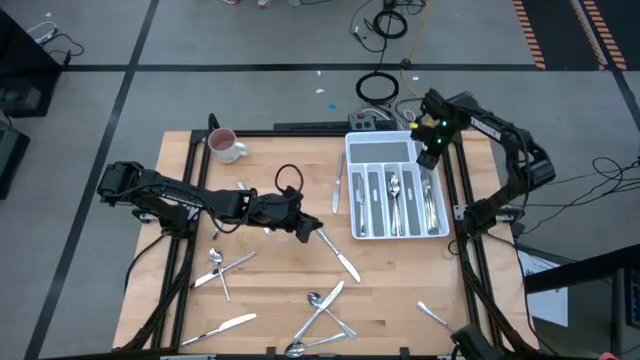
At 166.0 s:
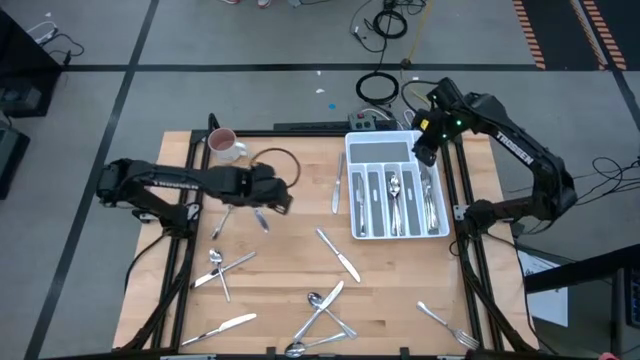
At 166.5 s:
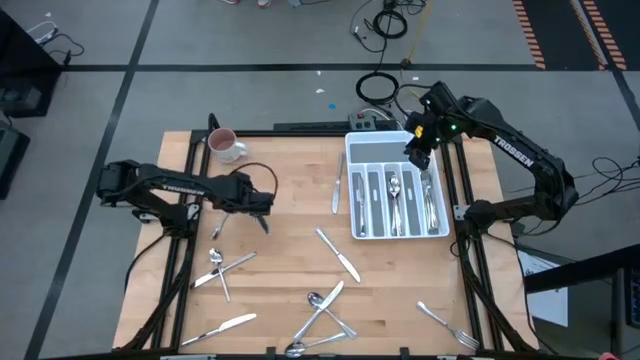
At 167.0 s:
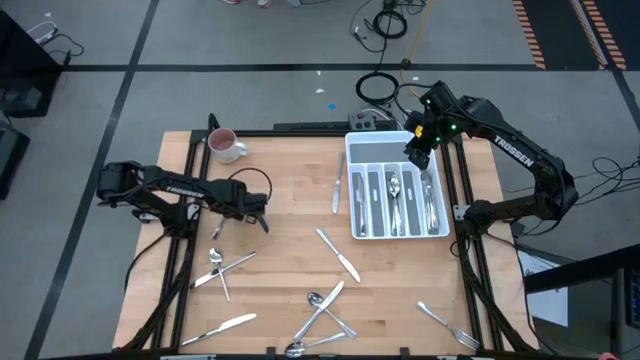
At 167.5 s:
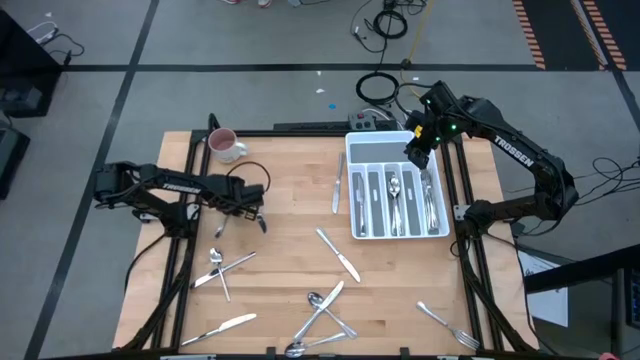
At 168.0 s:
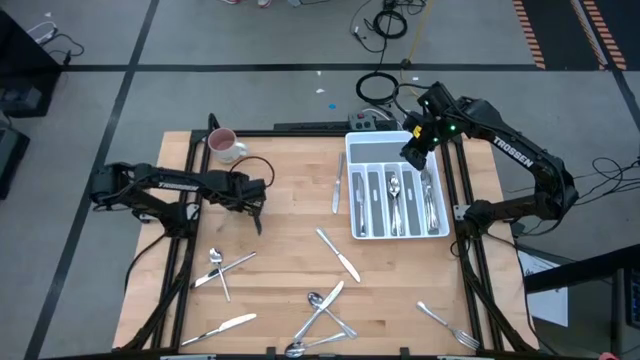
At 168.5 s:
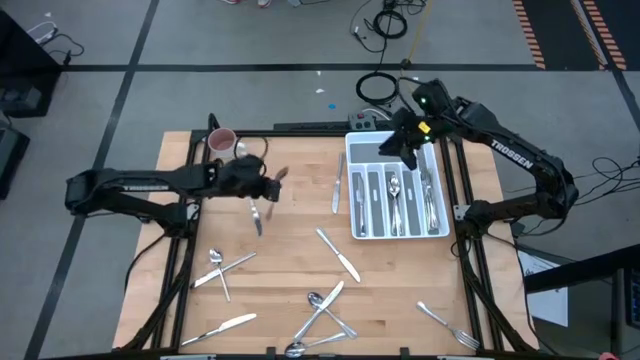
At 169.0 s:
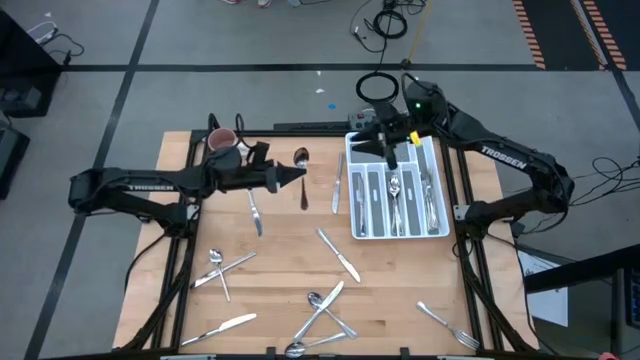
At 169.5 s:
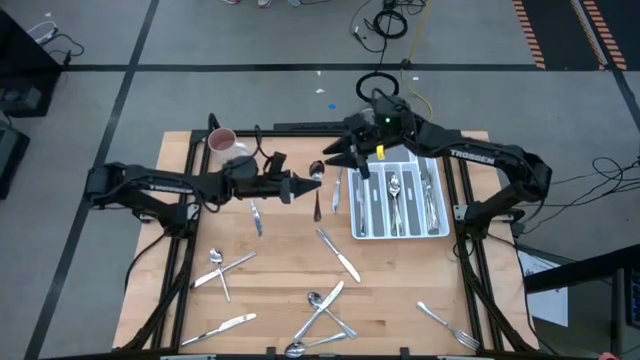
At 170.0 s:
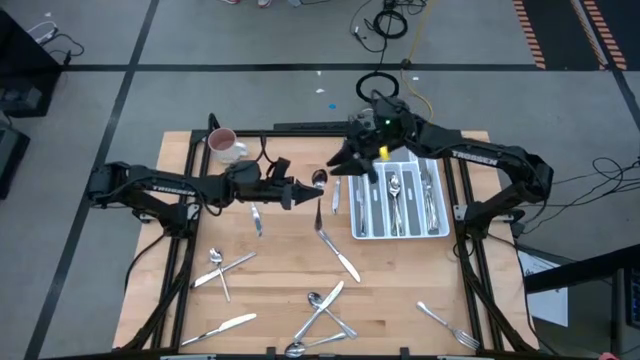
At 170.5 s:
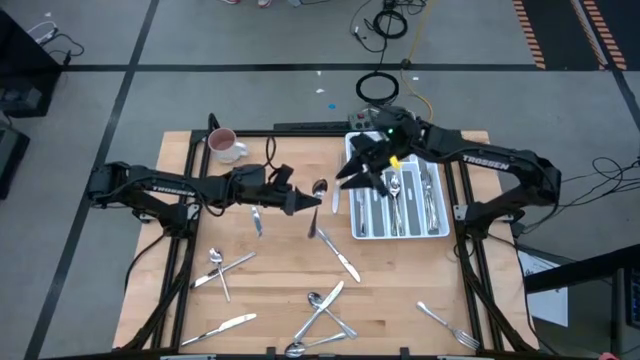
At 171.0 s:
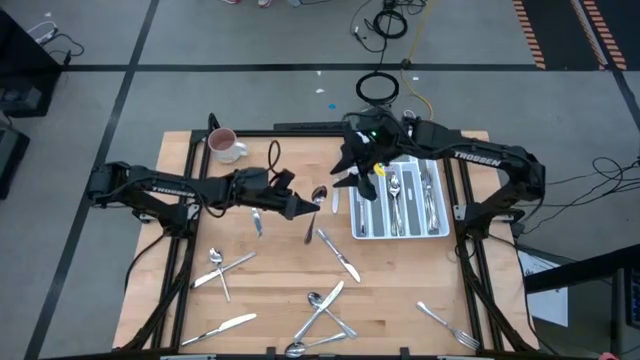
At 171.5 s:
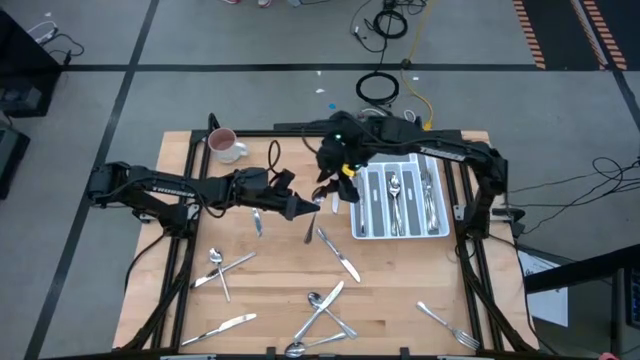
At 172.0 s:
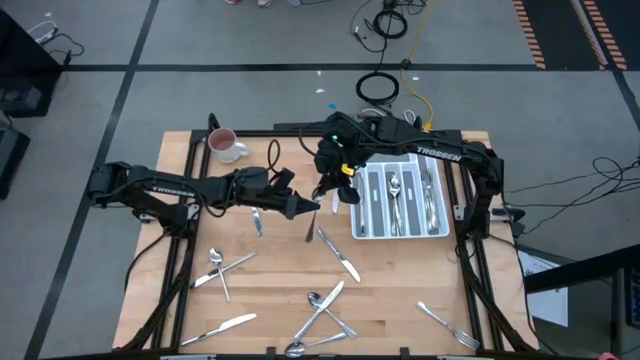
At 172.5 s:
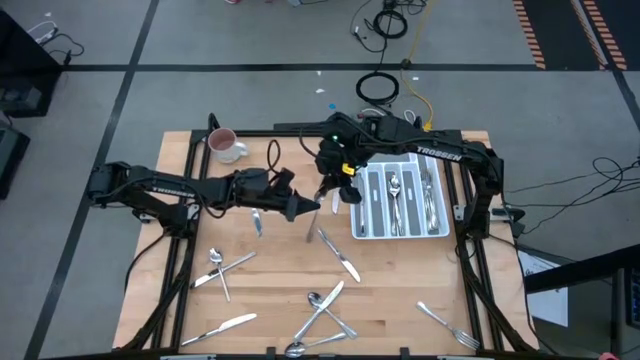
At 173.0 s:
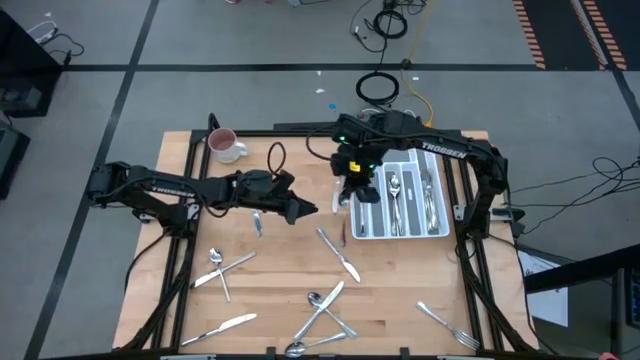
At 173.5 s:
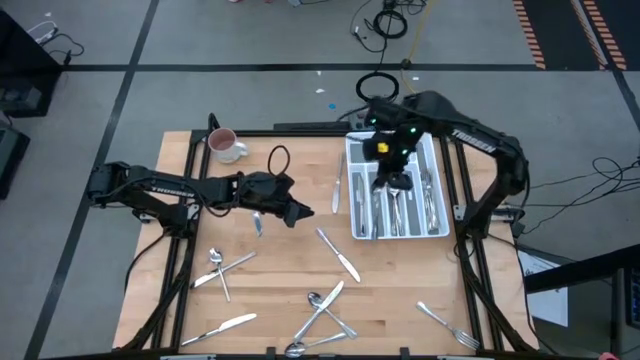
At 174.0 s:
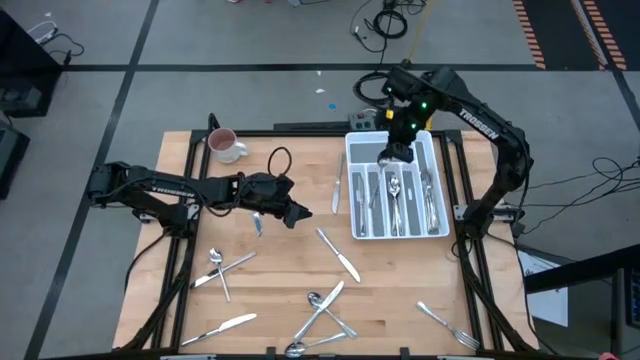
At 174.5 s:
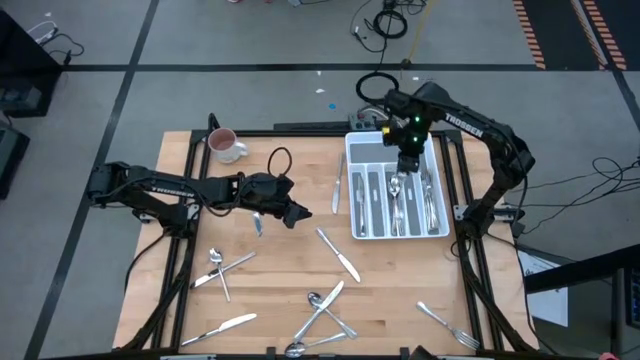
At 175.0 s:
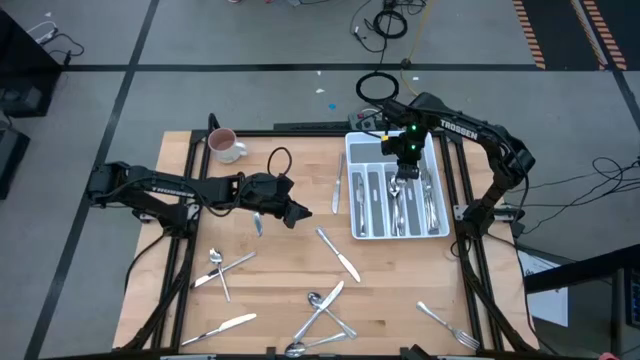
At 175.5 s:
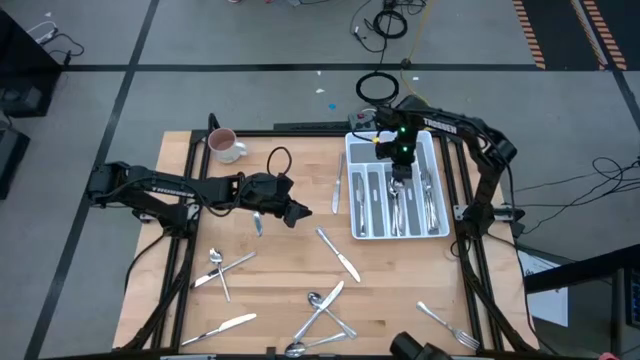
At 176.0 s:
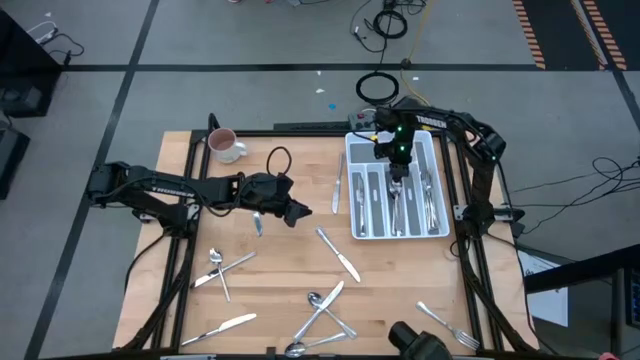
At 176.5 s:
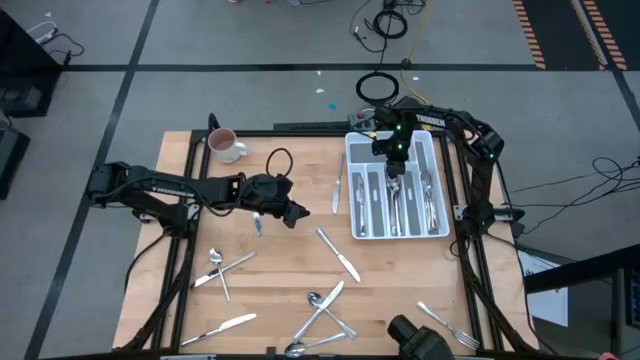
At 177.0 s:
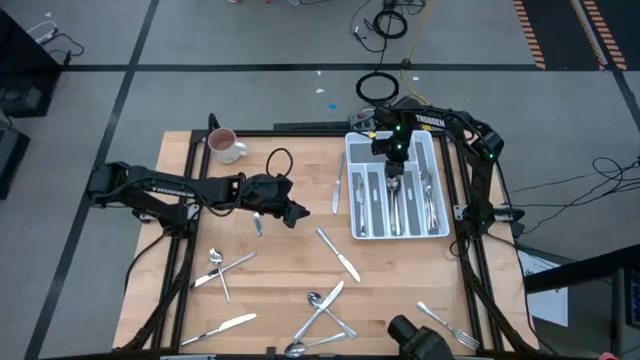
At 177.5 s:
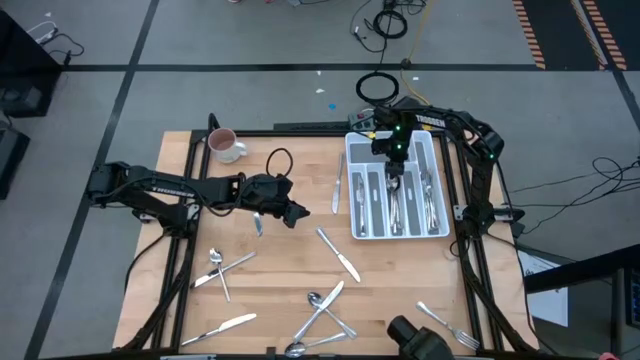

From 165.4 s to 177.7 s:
Task: Sort silverware
Put the spoon in the middle section of the silverware tray

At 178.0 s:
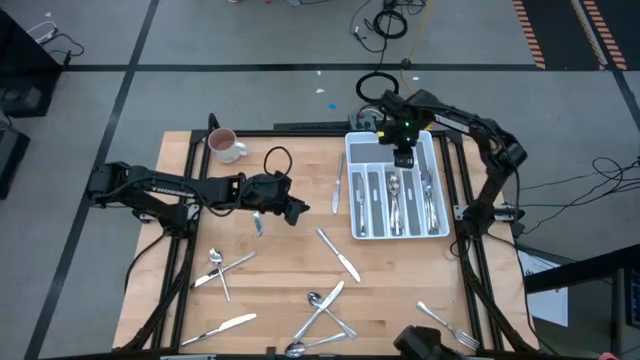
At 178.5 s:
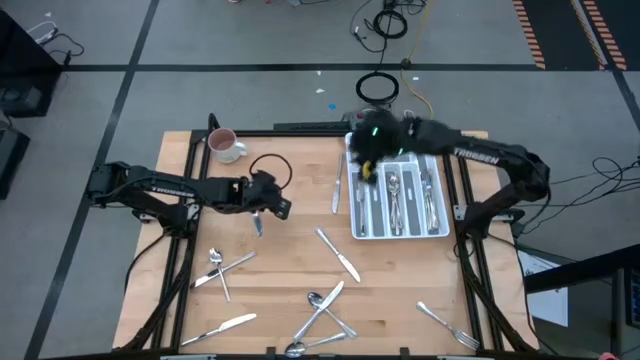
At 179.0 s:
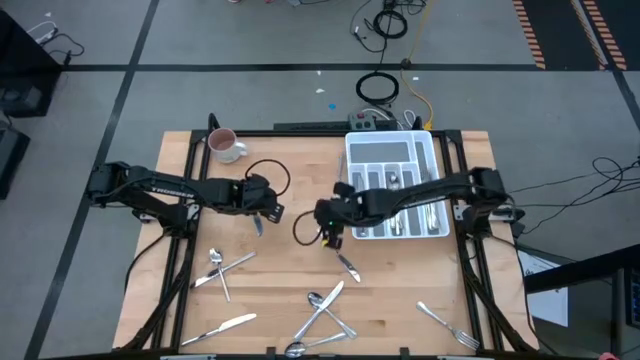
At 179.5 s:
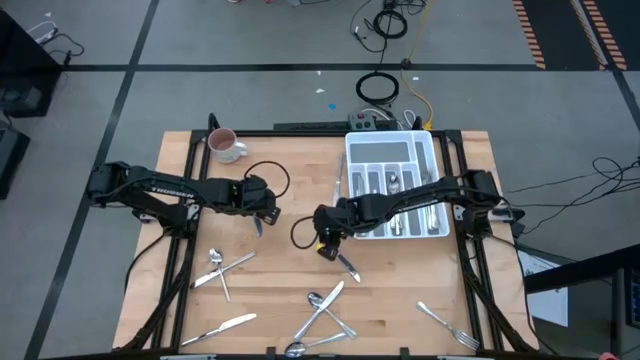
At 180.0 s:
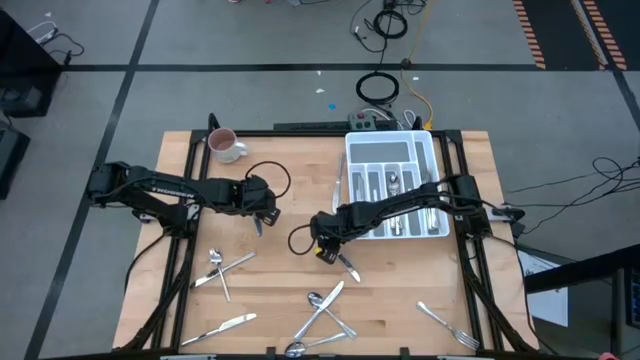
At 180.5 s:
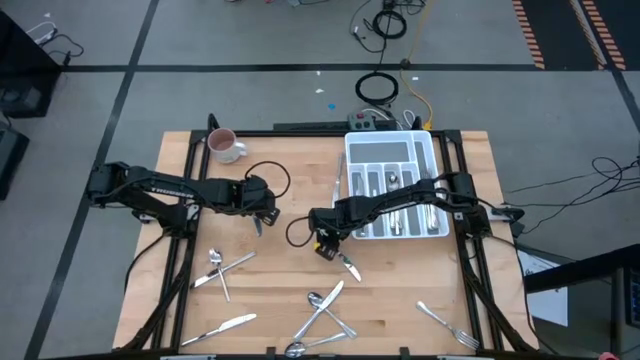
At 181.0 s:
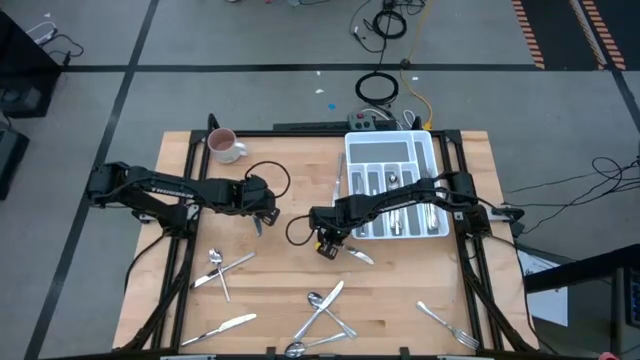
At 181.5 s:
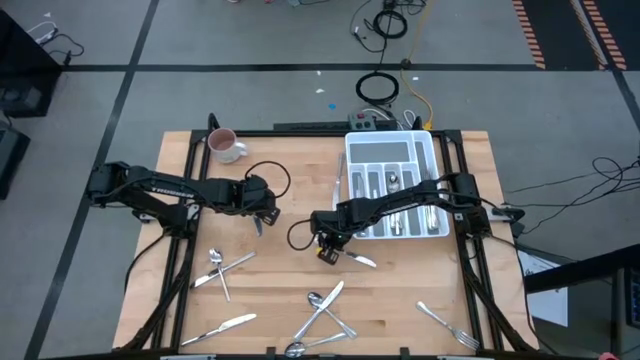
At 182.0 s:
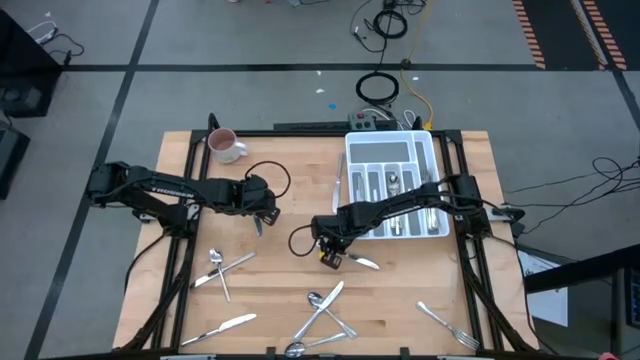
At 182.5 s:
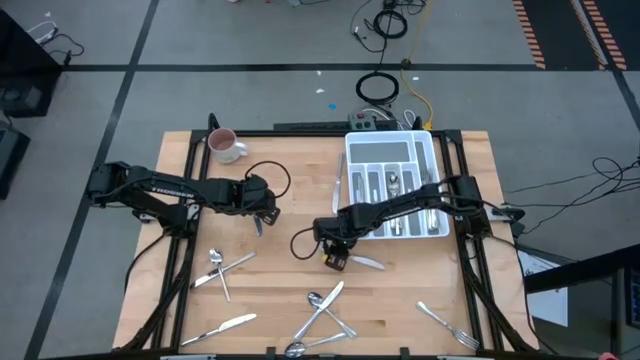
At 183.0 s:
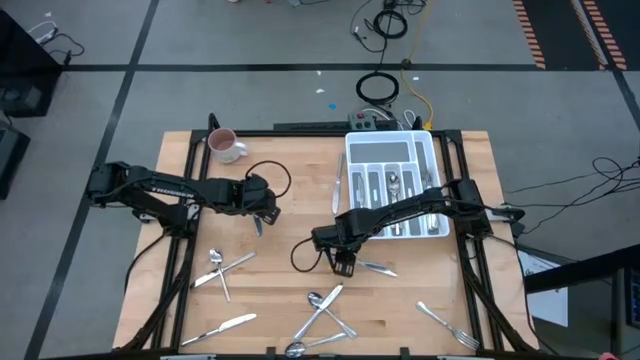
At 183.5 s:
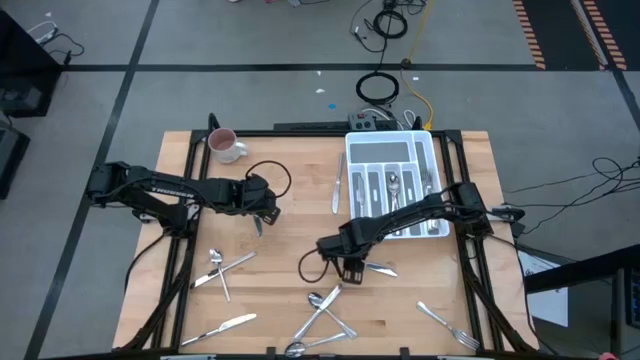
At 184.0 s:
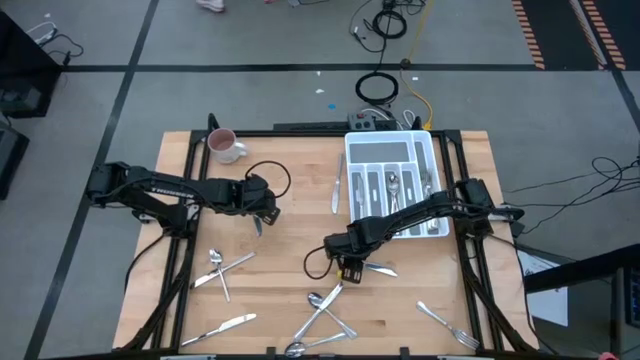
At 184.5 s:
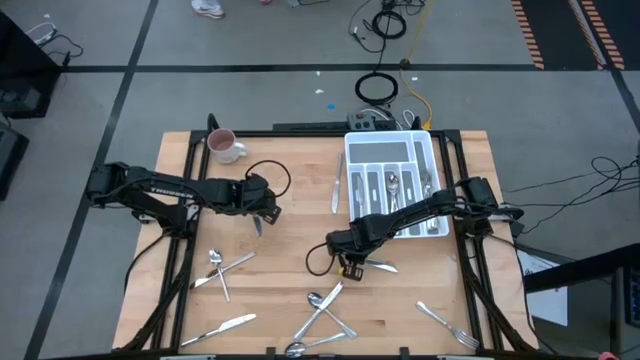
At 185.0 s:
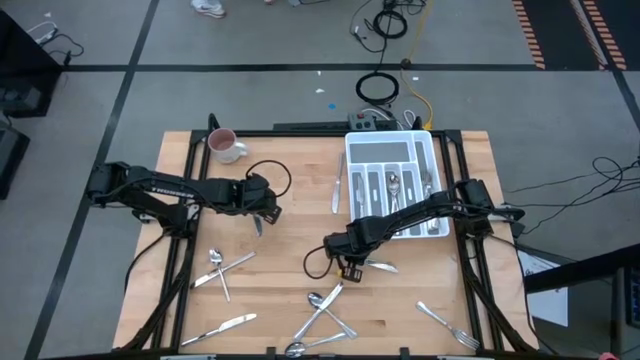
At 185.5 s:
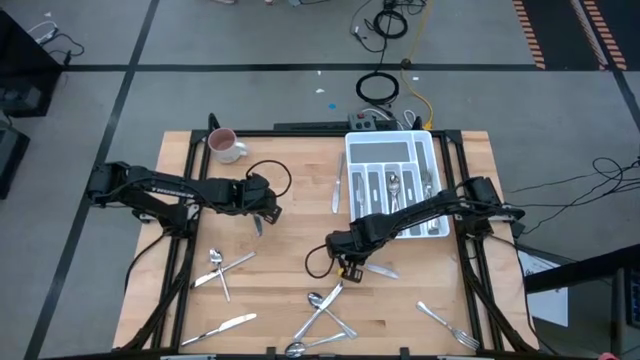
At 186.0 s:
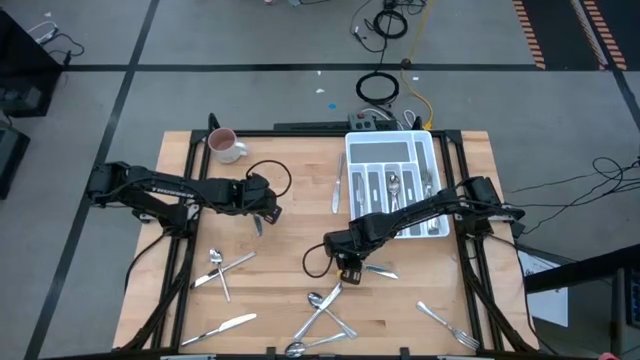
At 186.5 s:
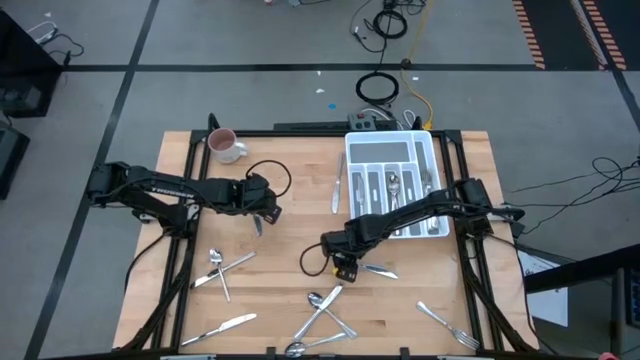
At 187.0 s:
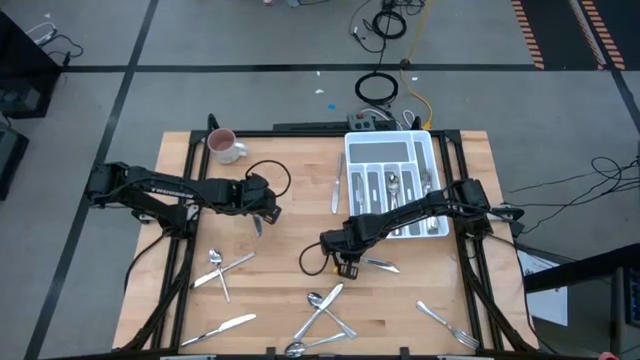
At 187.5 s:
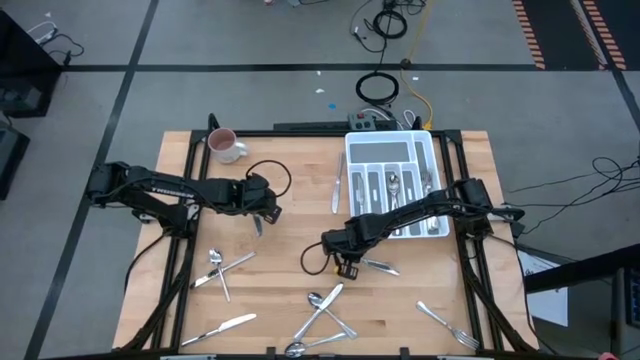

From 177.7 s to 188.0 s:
Put the knife in the left section of the silverware tray
